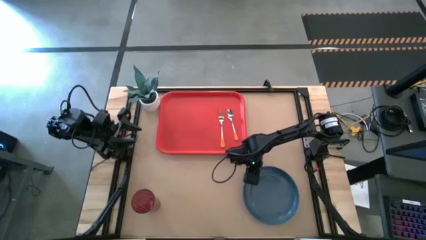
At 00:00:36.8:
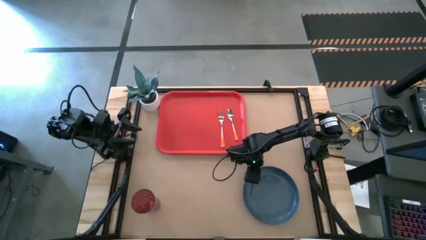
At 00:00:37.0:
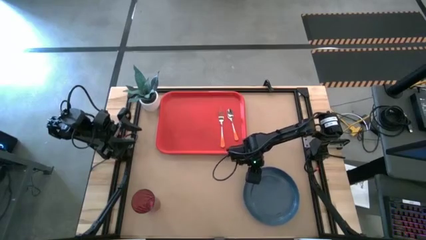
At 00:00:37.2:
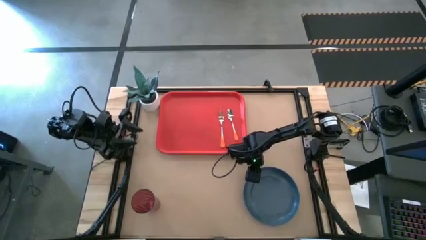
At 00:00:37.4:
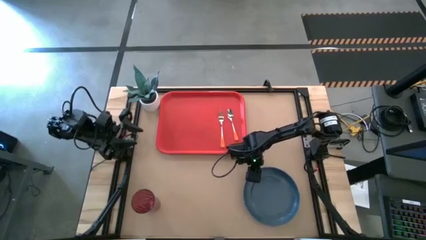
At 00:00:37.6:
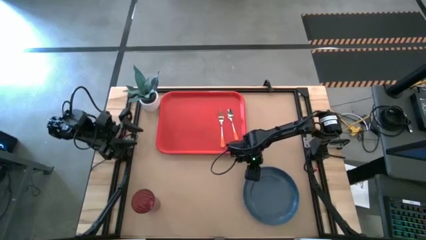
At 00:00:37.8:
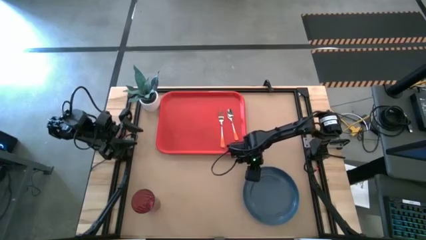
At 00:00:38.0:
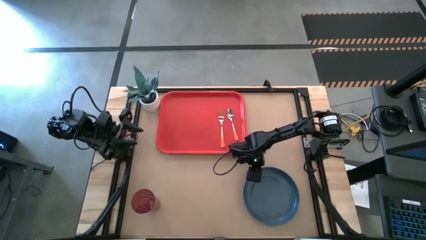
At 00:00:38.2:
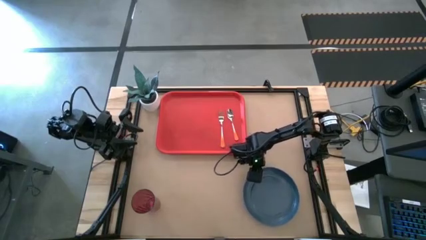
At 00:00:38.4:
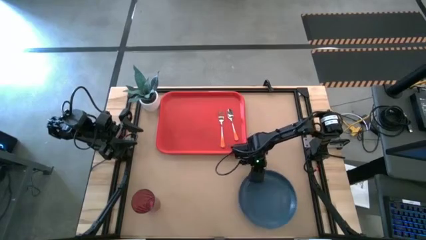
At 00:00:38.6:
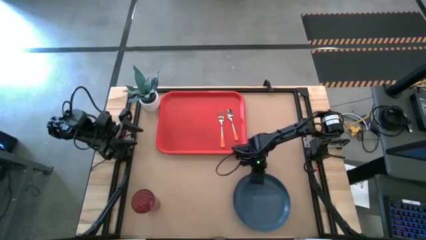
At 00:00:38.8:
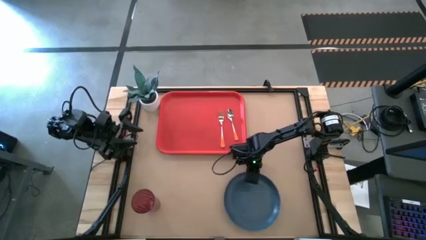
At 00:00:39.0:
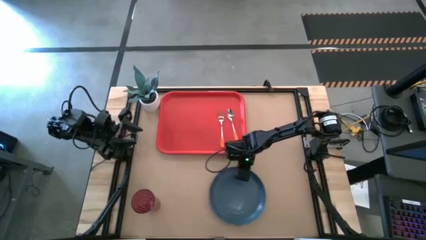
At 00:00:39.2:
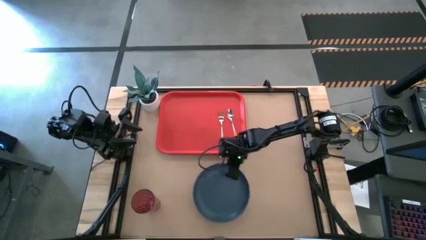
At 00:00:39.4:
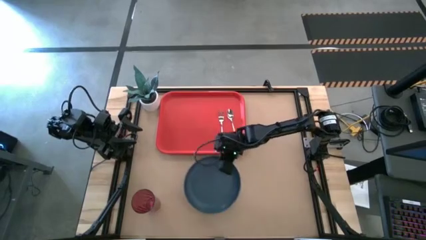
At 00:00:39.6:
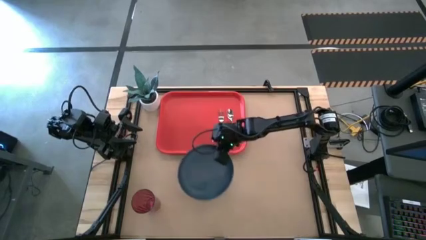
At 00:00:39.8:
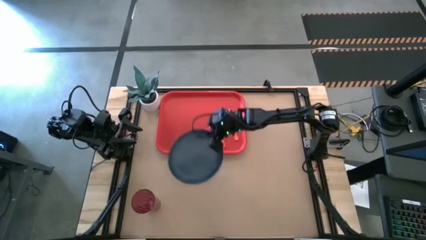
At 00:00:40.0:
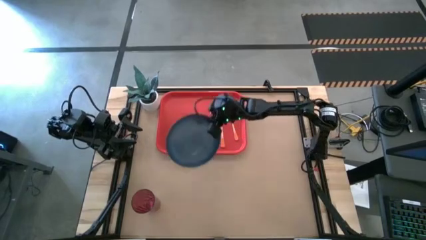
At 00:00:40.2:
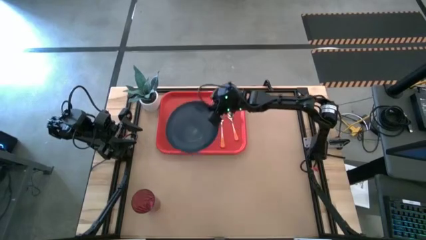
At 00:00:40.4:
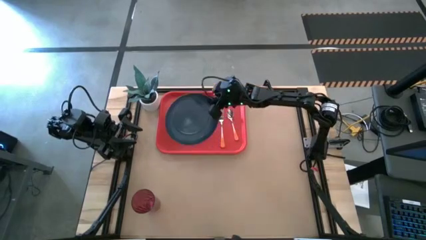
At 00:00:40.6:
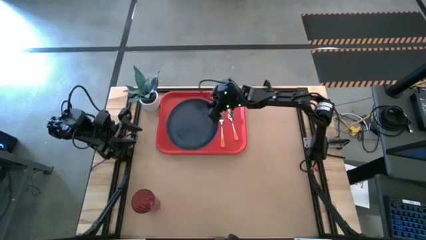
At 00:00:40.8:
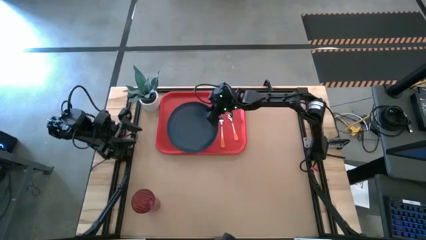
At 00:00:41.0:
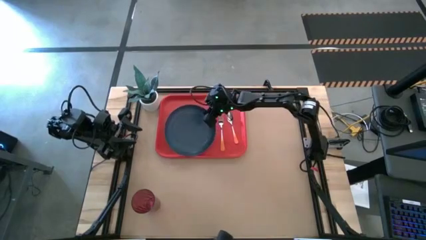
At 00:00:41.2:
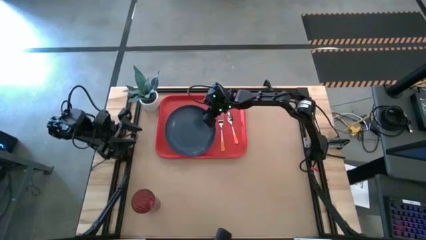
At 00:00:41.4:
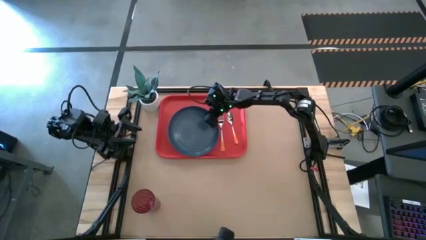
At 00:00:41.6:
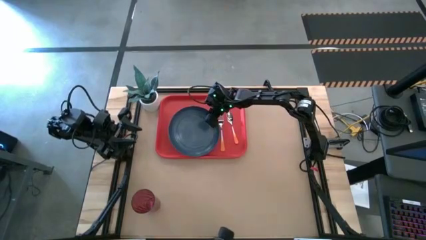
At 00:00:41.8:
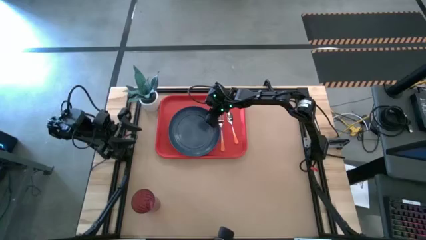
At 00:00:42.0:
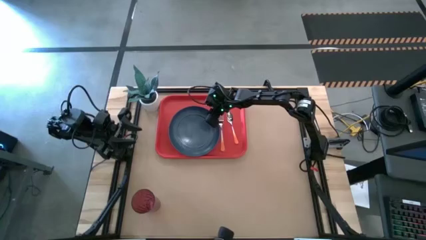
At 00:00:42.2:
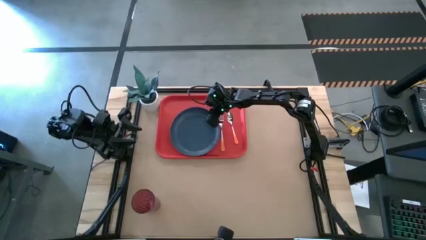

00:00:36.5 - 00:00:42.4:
Task: Pick and place plate/cup/fork/spoon on tray
Put the blue plate on the bottom of the red tray

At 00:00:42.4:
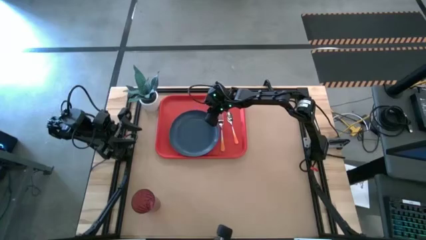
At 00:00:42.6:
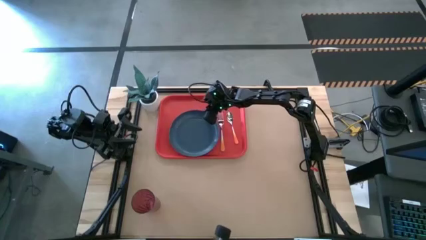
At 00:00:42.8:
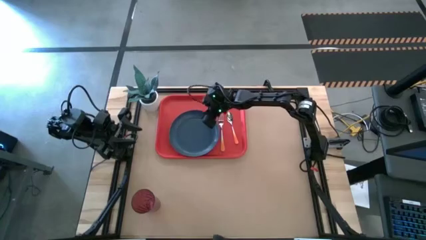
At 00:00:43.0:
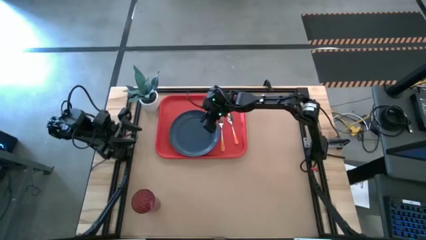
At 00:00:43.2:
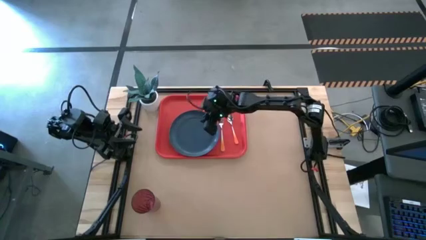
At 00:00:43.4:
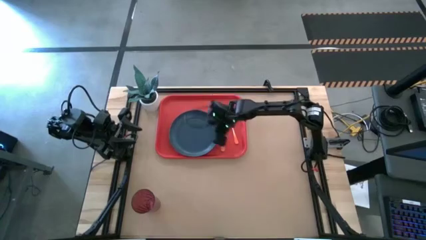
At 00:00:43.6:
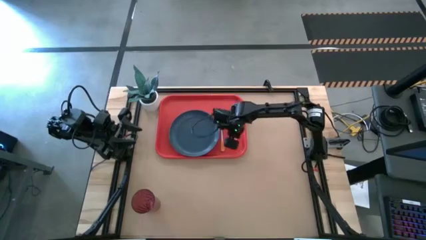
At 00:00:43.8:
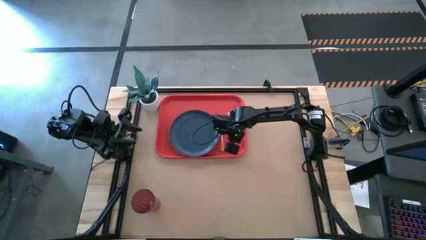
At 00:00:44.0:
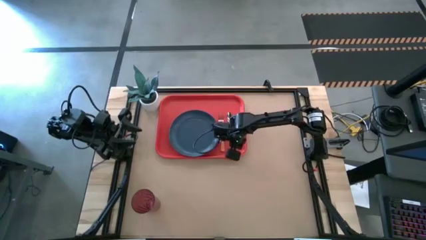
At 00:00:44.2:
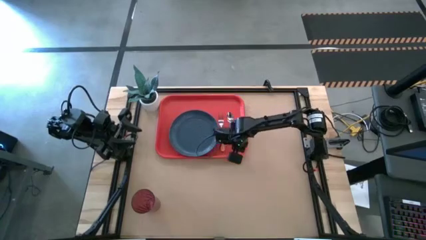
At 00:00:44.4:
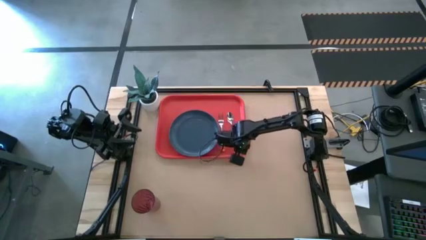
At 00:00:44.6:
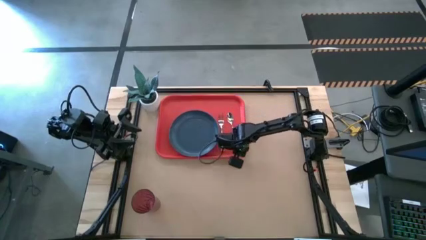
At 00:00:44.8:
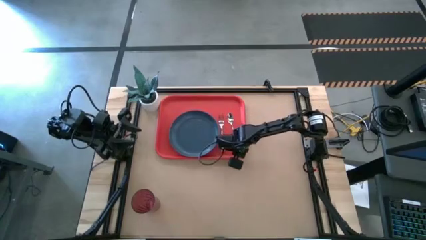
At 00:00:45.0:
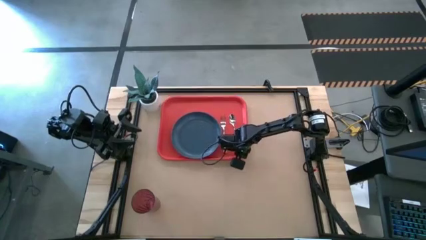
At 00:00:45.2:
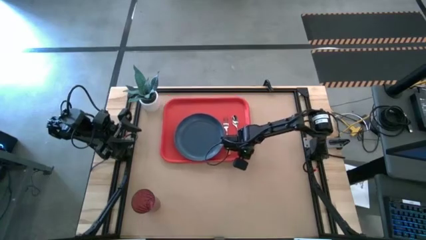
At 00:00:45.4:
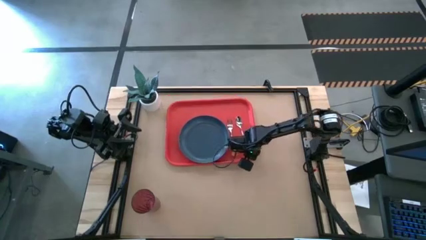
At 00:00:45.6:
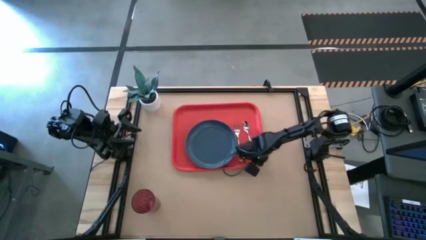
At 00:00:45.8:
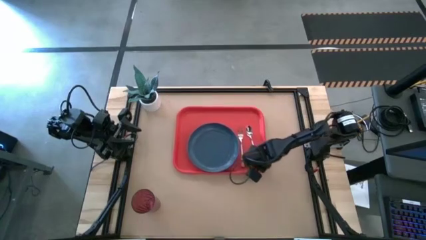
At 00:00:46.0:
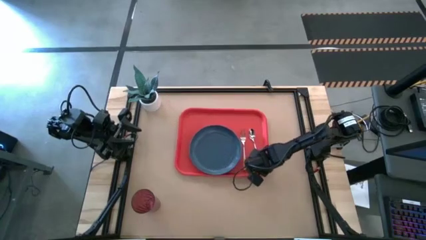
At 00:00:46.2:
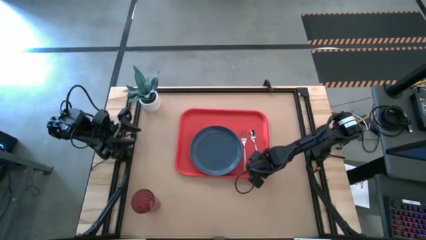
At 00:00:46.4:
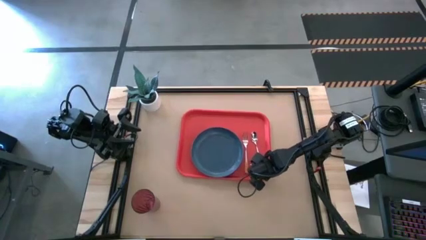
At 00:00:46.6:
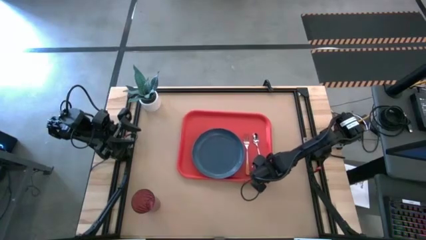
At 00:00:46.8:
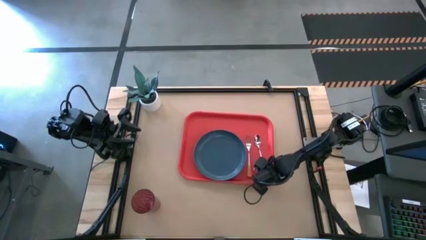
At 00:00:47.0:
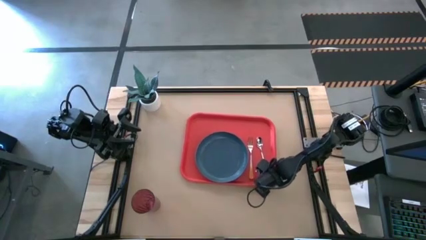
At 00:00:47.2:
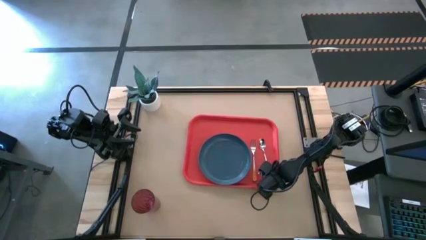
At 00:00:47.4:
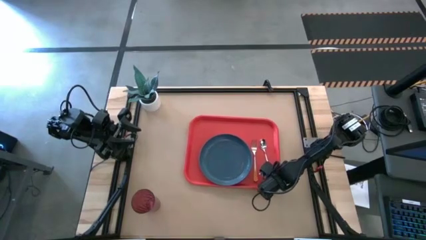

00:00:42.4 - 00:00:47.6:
Move the red tray to the center of the table

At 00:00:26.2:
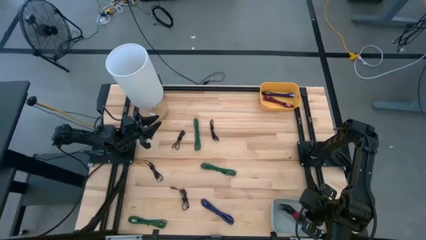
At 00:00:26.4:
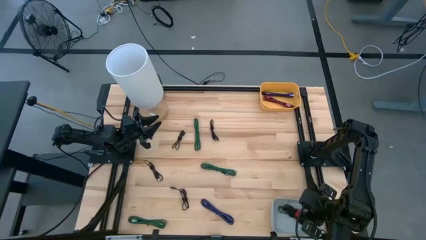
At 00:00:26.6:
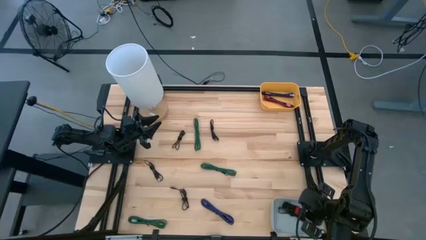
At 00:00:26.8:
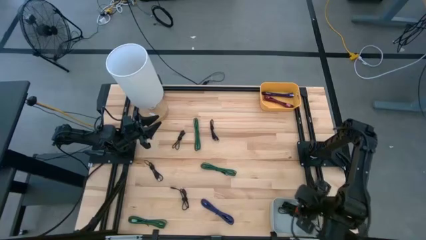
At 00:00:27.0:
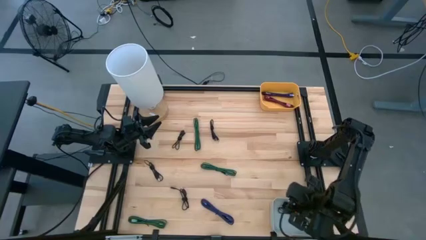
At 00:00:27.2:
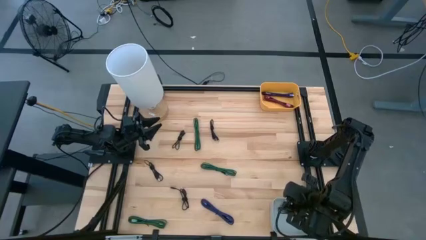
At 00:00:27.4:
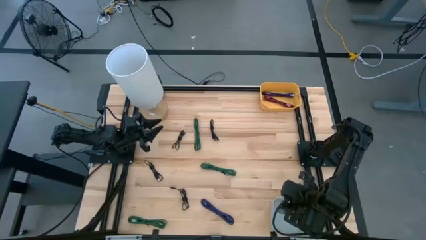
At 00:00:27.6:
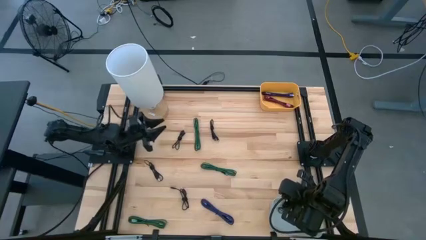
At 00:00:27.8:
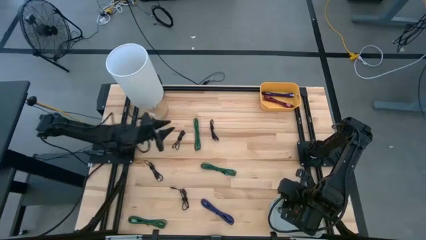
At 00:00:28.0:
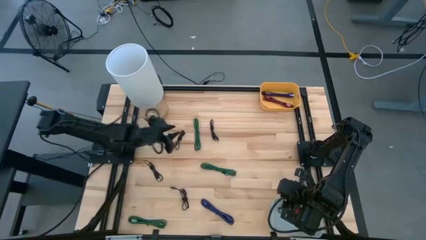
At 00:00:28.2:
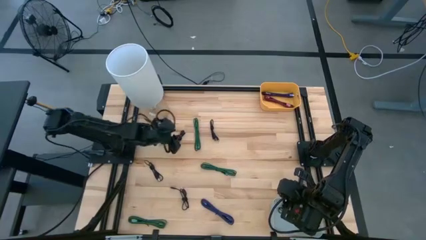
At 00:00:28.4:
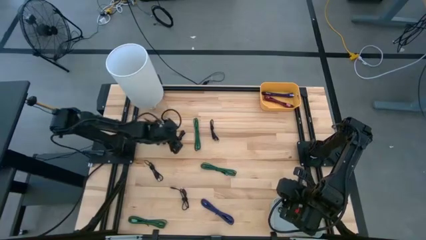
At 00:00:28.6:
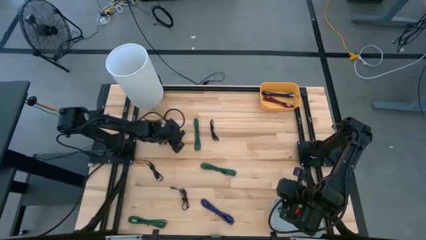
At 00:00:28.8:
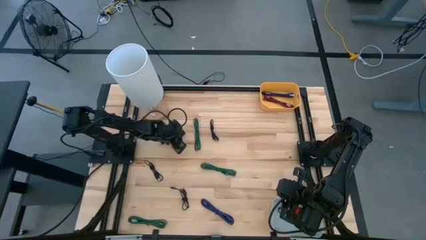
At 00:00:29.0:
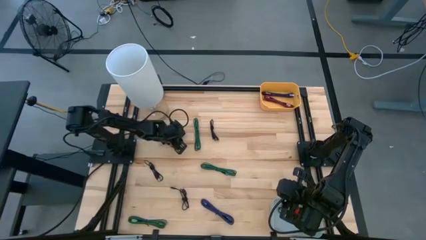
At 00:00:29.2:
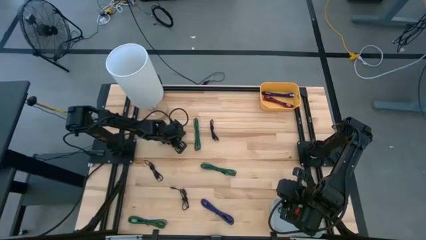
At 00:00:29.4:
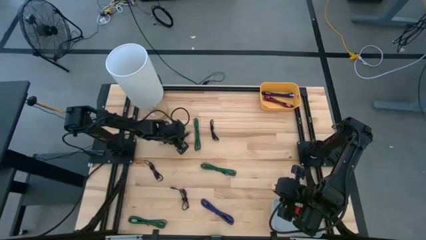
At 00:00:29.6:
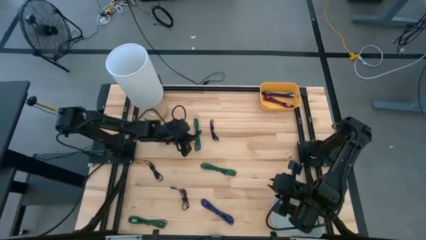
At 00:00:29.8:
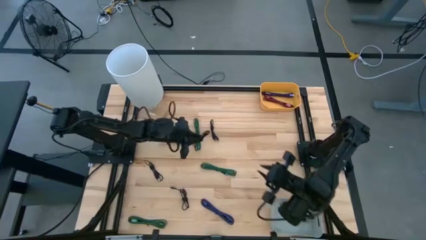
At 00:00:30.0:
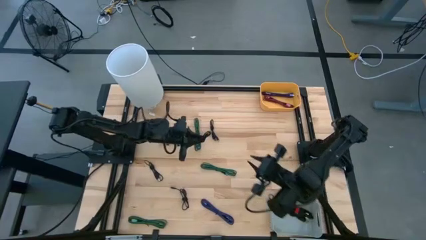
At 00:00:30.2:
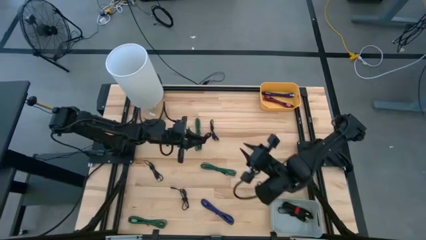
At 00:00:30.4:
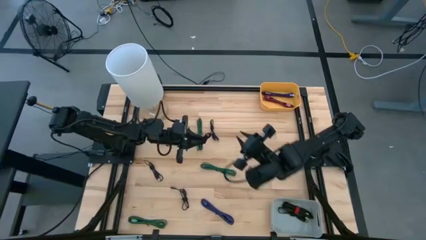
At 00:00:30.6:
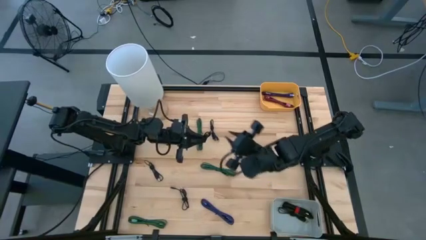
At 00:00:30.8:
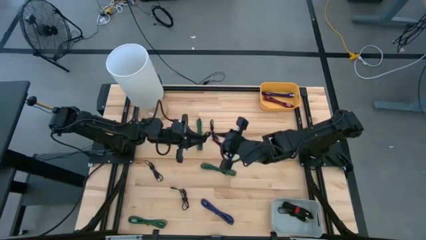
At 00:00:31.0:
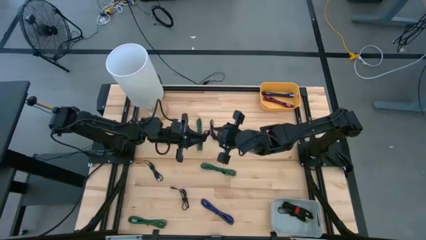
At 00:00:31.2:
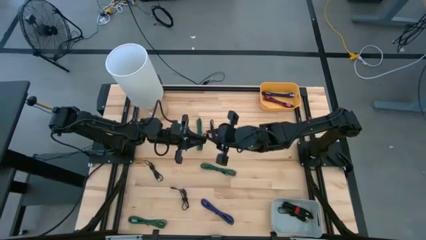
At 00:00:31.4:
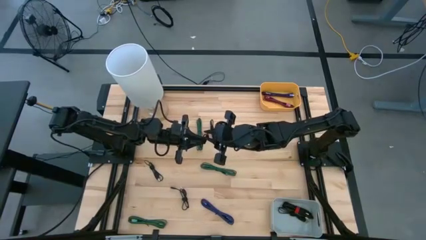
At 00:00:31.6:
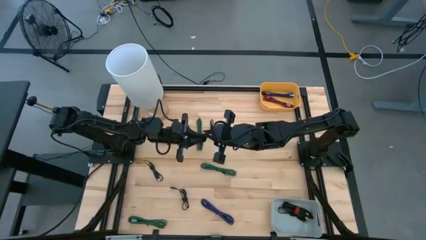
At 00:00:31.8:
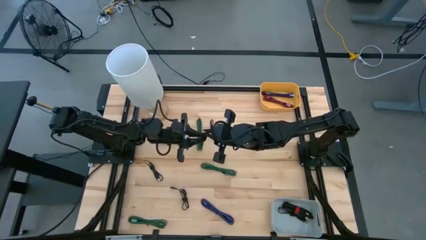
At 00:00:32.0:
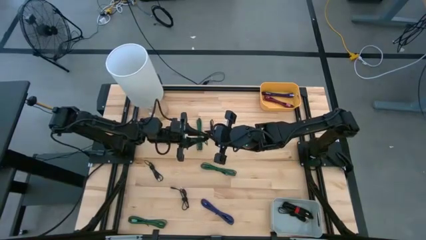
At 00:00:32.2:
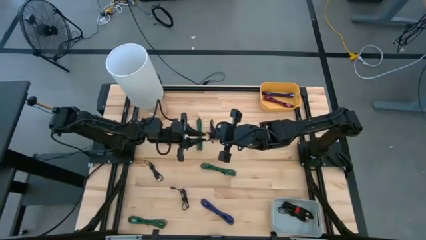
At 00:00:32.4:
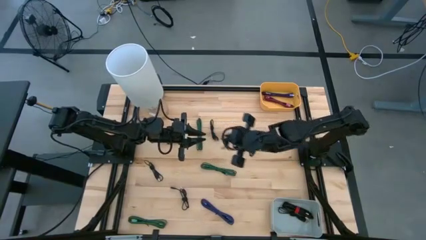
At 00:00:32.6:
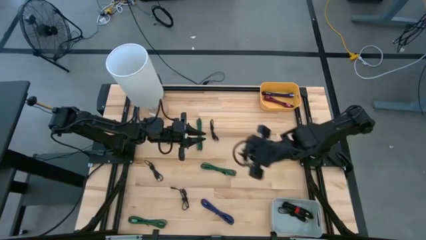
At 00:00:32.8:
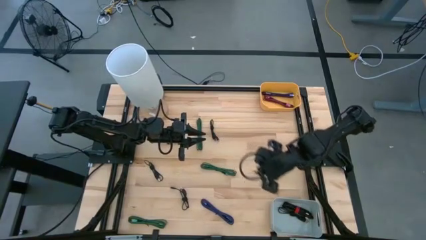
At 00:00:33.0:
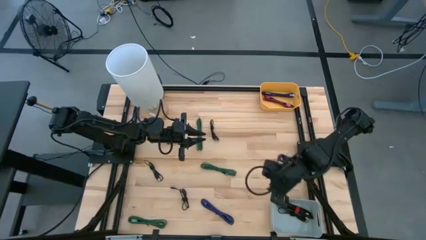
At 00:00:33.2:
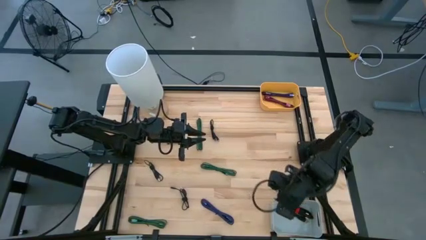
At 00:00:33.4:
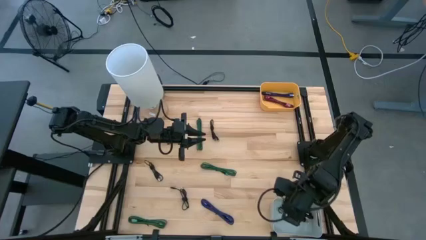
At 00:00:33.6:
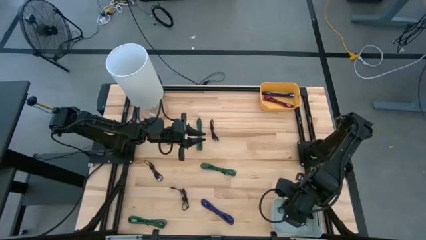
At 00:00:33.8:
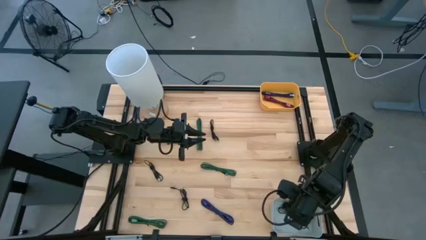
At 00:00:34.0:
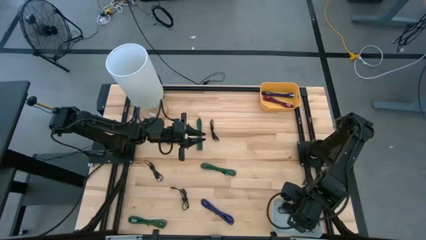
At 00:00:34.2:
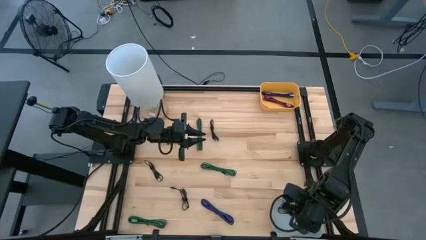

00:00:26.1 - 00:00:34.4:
Task: Pick & Place USB Port
Put the black USB cable into the gray bin
